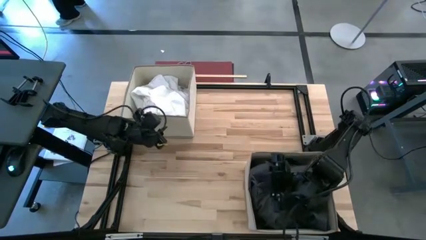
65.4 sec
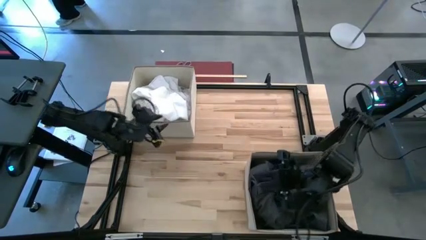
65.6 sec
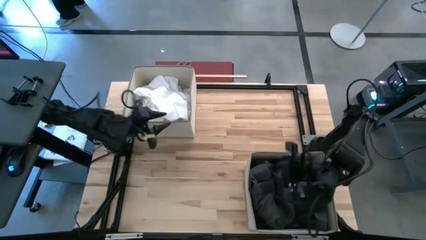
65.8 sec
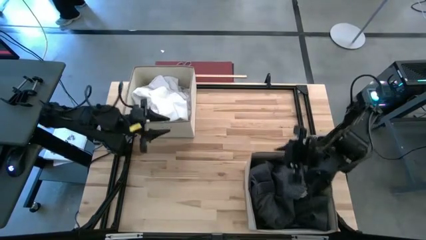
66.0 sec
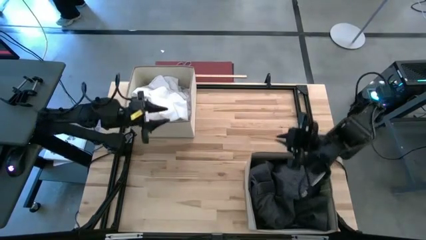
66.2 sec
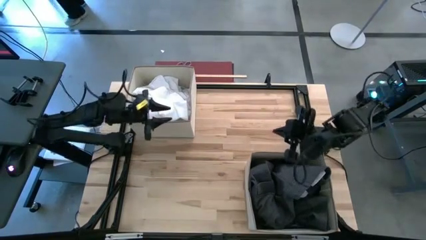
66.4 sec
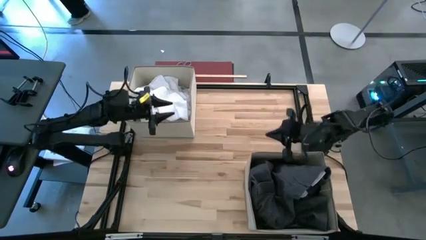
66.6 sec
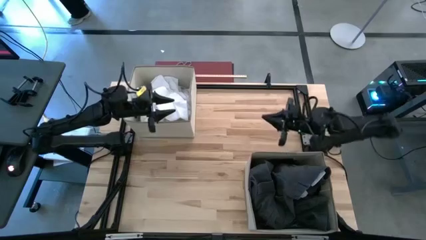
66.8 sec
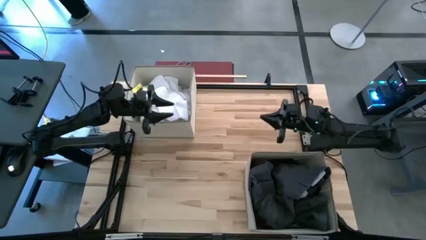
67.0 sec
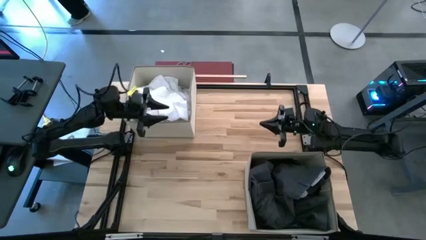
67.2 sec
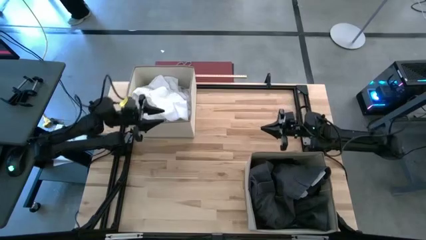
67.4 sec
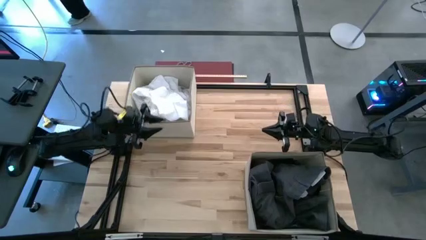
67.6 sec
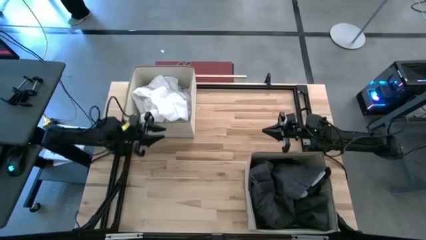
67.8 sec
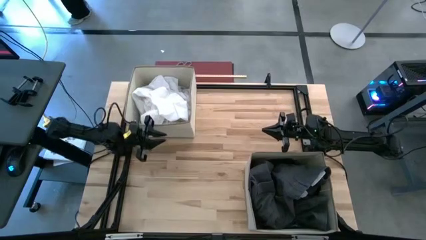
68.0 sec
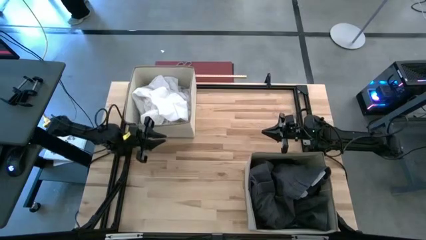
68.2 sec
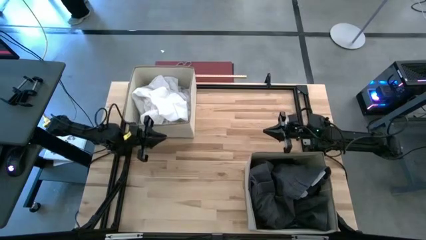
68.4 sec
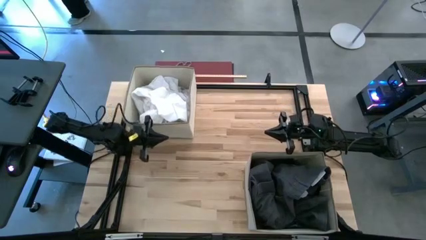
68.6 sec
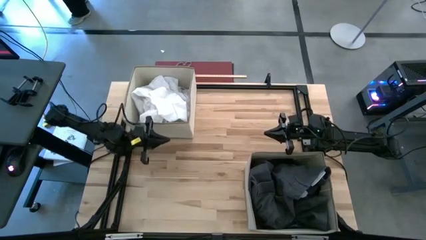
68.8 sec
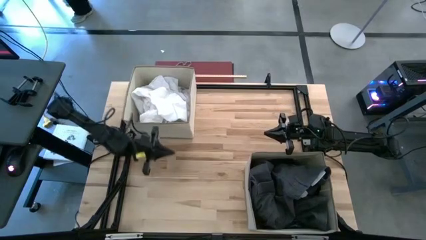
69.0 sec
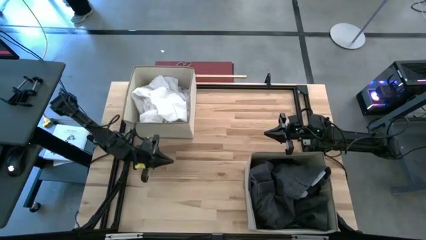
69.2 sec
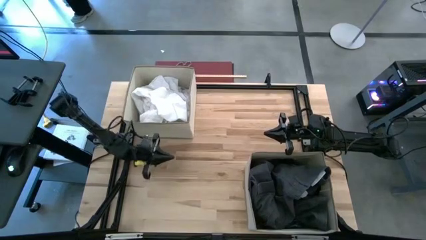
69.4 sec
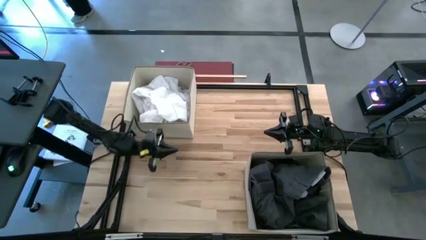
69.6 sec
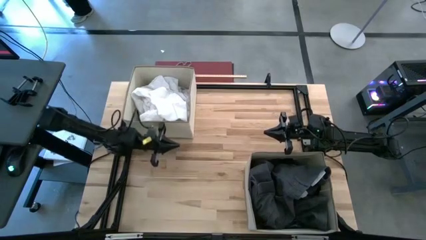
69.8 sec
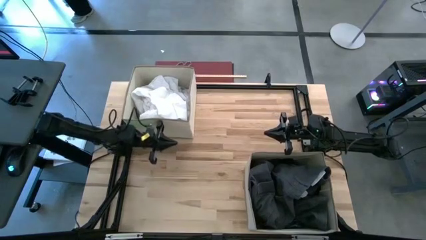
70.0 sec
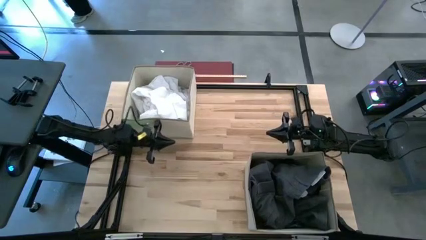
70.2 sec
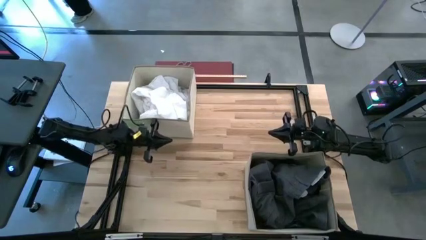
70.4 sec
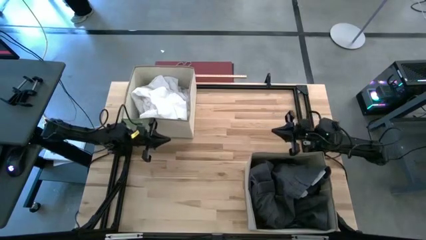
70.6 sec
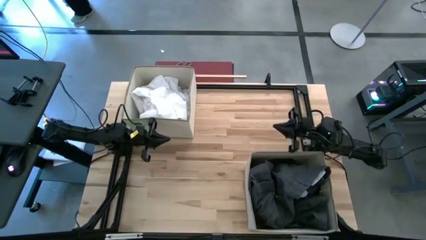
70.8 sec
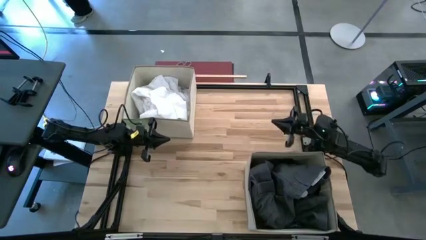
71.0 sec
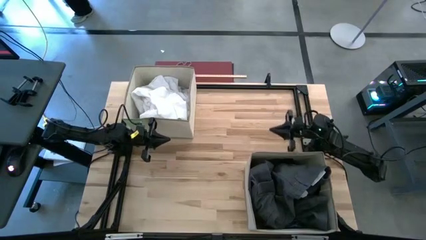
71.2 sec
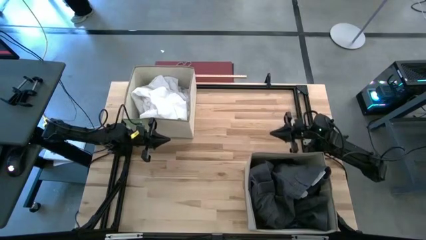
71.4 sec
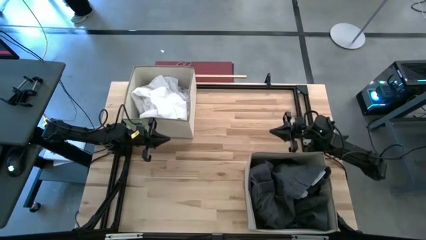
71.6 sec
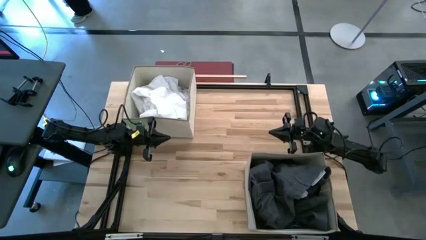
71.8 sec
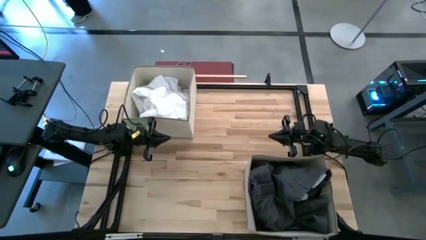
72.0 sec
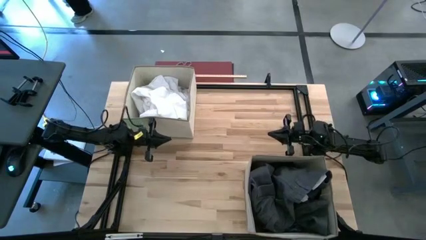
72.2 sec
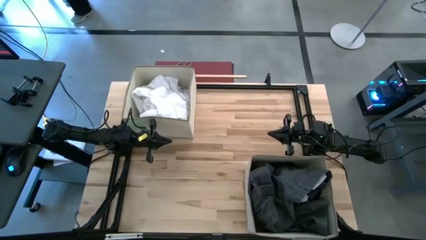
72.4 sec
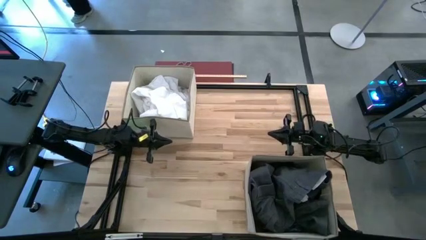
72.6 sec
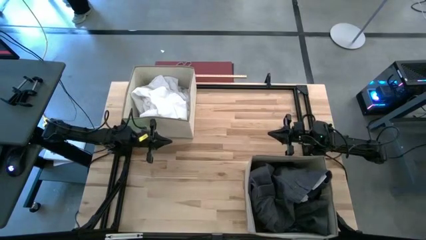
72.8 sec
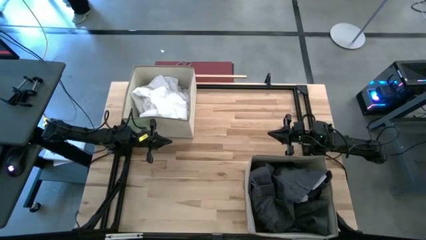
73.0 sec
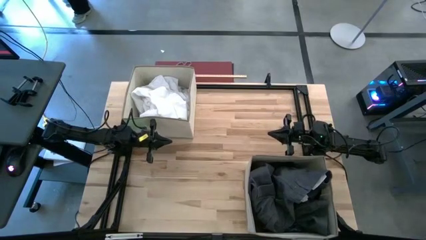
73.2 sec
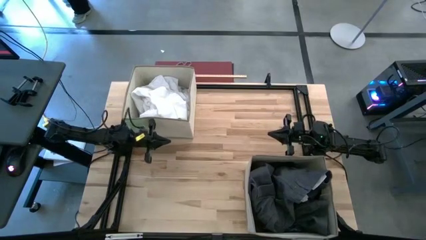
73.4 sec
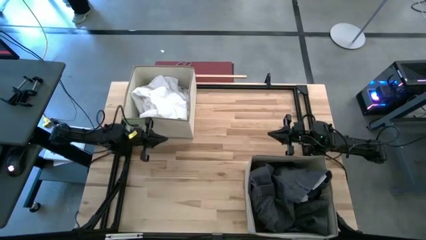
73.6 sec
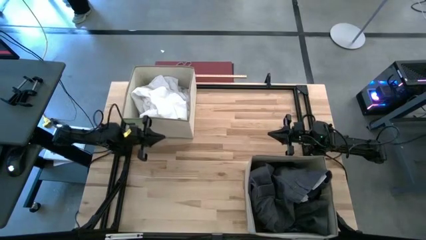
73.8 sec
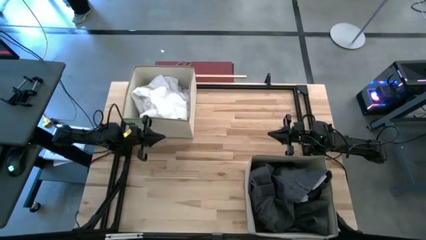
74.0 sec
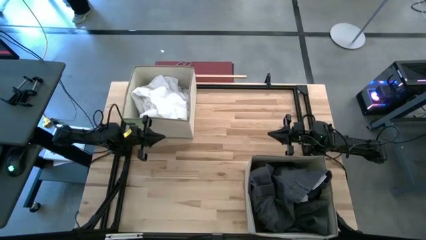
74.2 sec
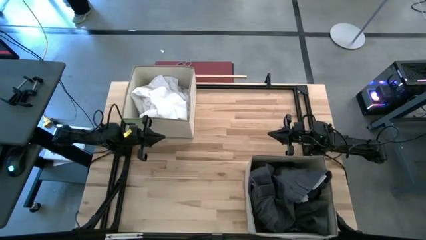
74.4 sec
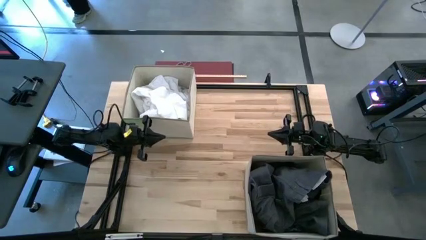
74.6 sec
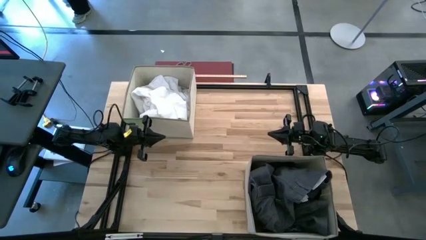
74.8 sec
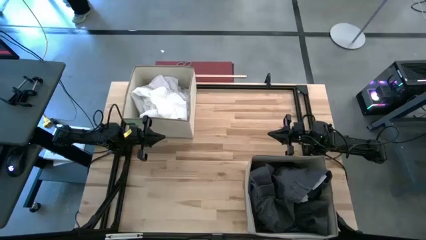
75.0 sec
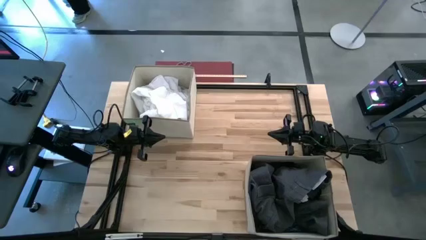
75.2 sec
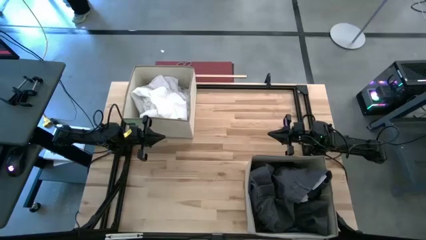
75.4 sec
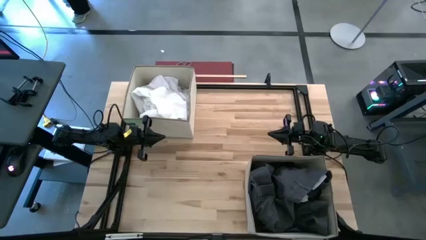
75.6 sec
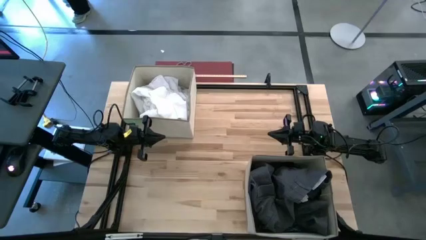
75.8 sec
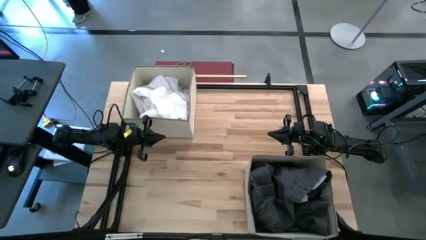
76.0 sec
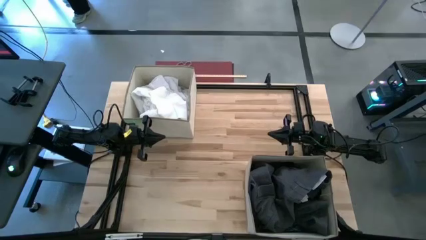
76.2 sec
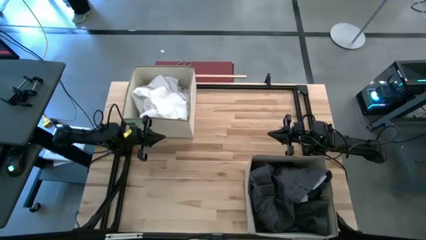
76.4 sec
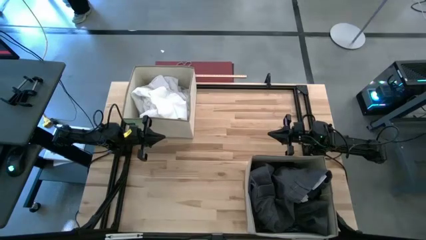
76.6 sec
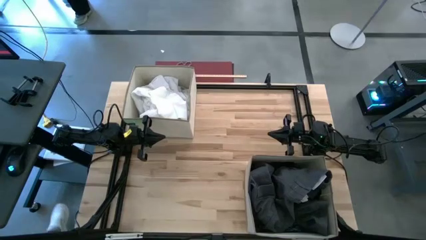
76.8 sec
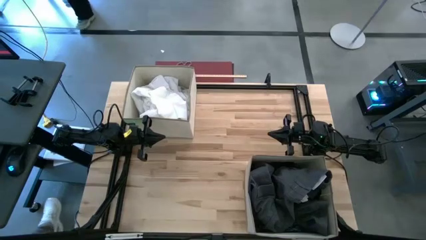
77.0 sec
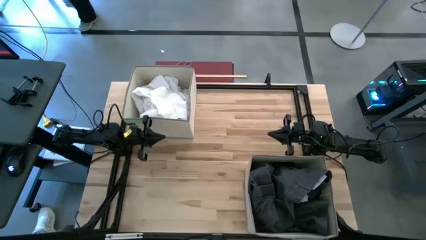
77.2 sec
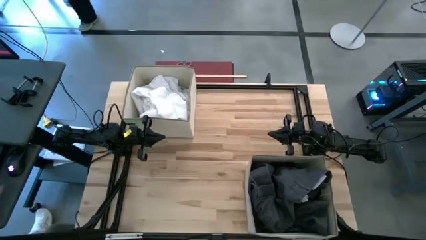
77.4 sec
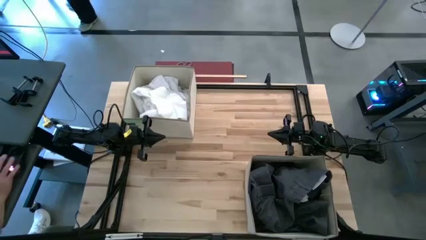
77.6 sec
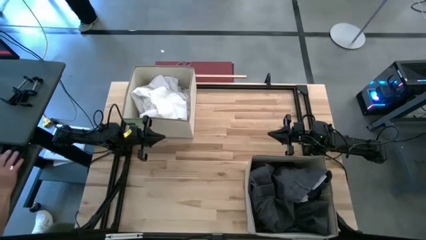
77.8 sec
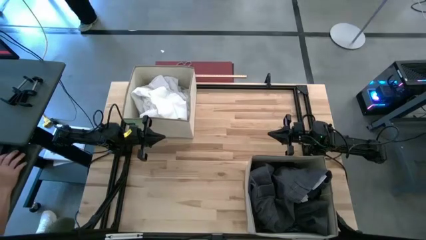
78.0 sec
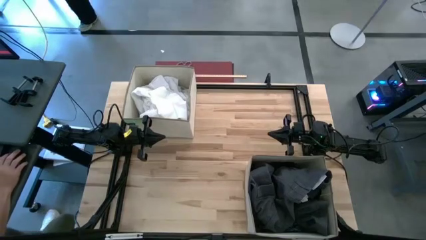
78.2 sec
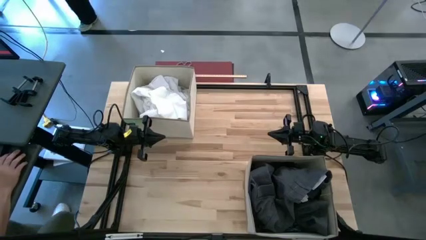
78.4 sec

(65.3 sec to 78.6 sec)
Task: Sort clothes
Return to Home Position

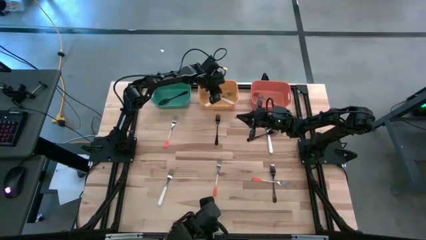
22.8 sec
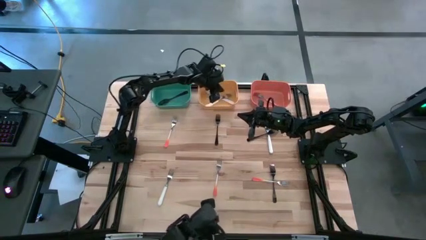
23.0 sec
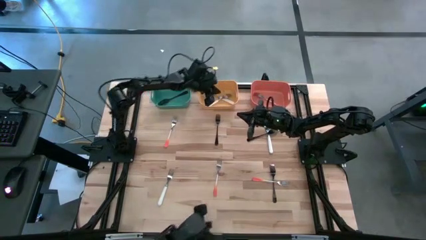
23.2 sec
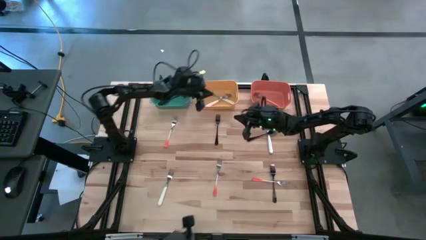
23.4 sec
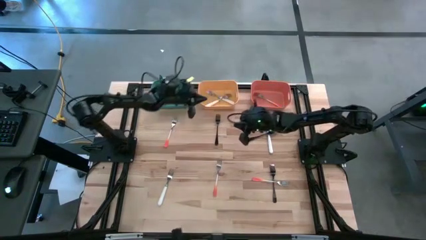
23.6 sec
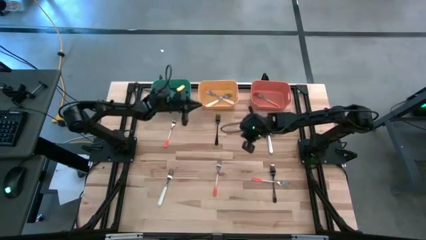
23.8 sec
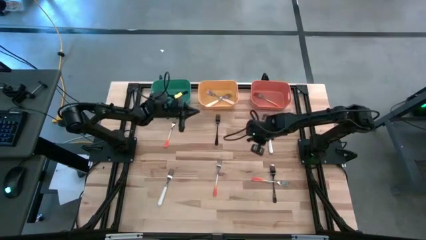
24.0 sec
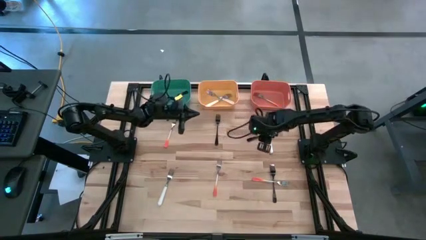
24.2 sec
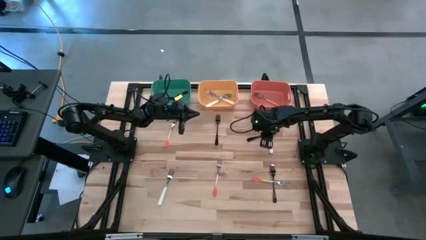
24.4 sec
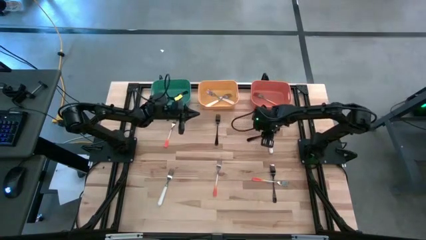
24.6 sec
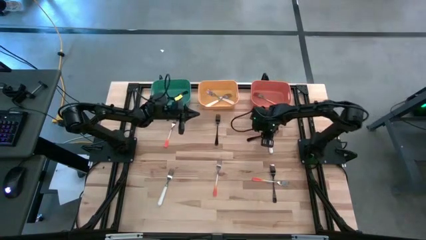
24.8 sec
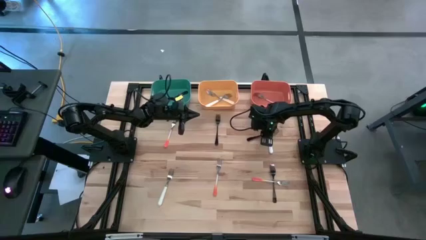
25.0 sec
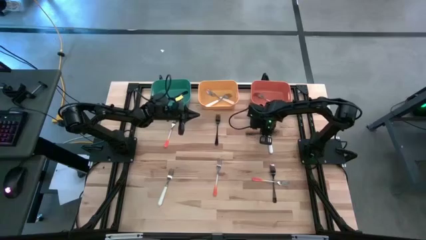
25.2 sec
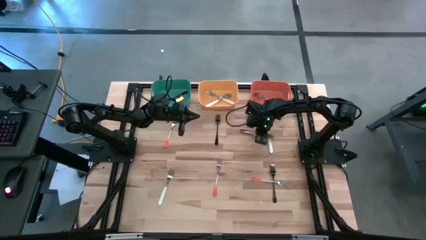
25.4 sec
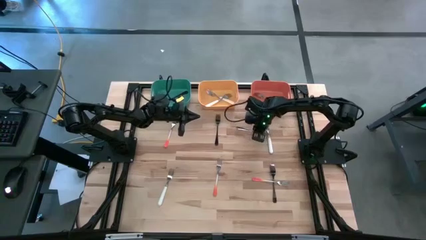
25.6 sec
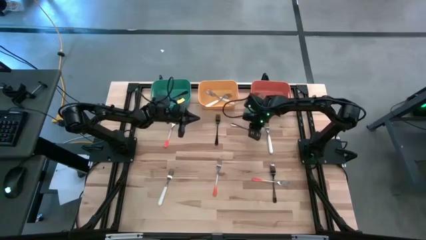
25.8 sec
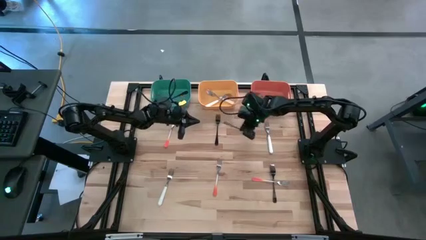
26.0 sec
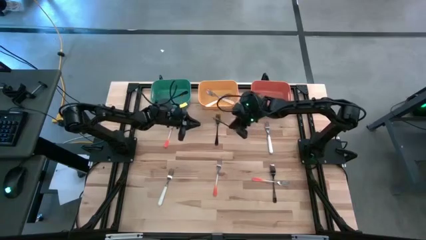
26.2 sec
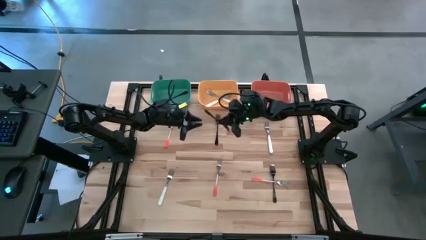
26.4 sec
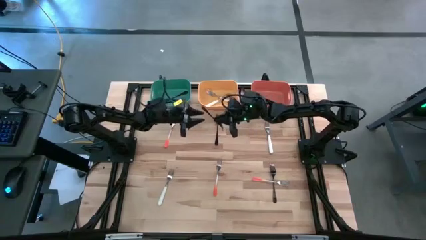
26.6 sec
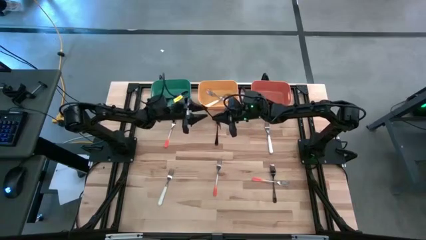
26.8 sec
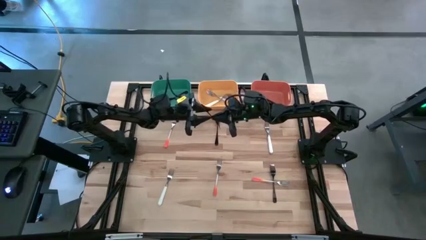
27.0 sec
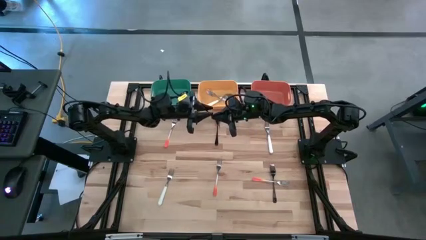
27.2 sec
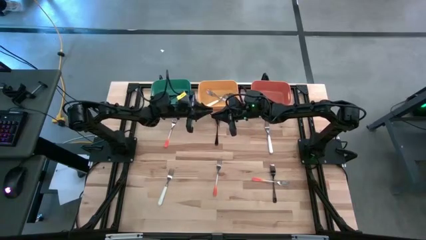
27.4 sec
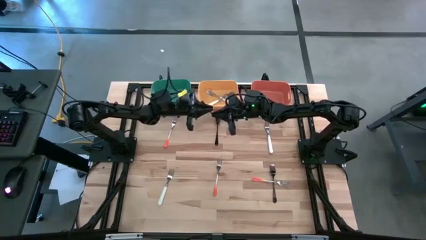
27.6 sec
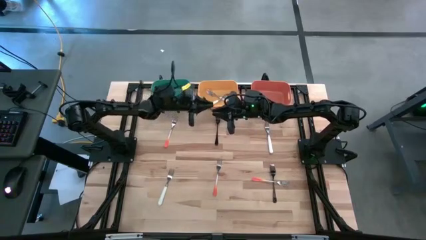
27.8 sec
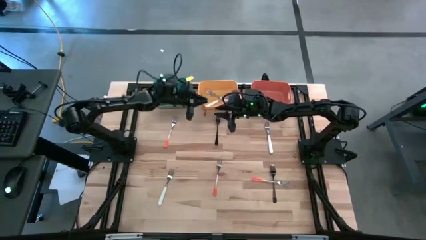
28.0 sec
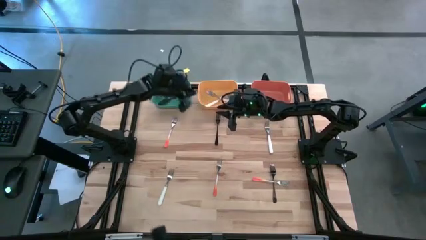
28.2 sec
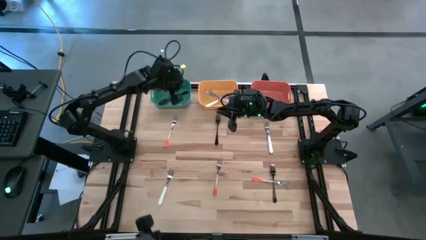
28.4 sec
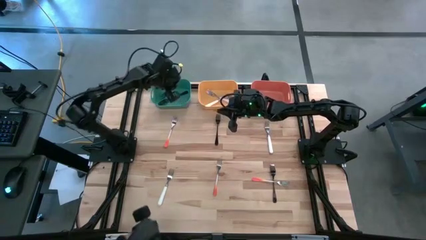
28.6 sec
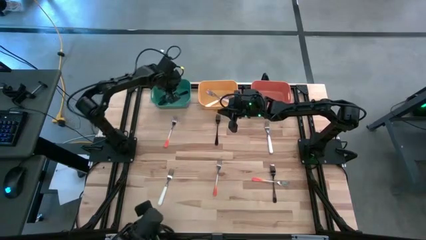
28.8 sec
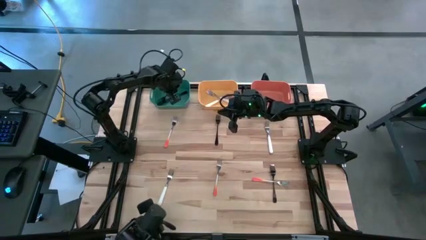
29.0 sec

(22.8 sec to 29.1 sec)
Task: Sort silverware by color (type)
Put the black fork into the green bin
